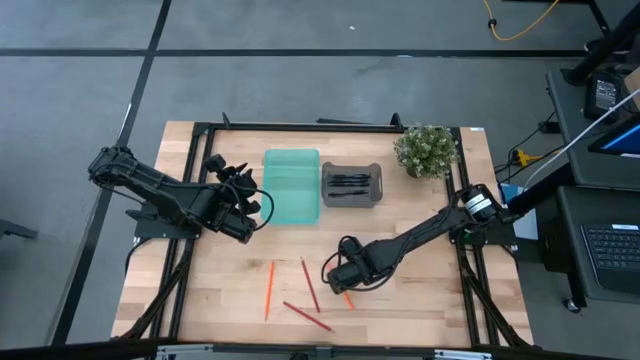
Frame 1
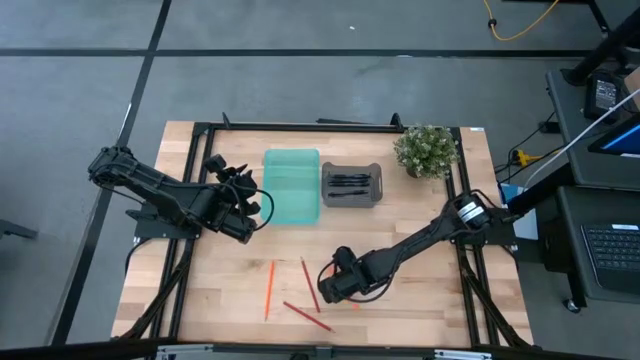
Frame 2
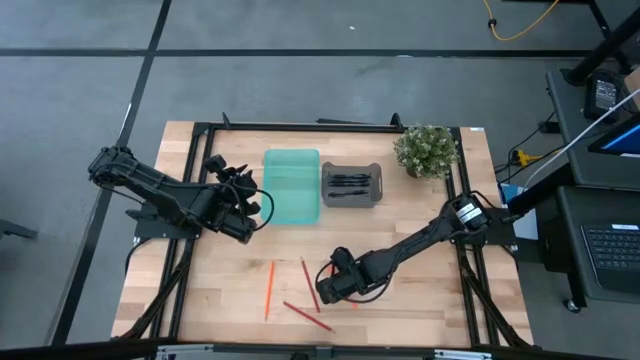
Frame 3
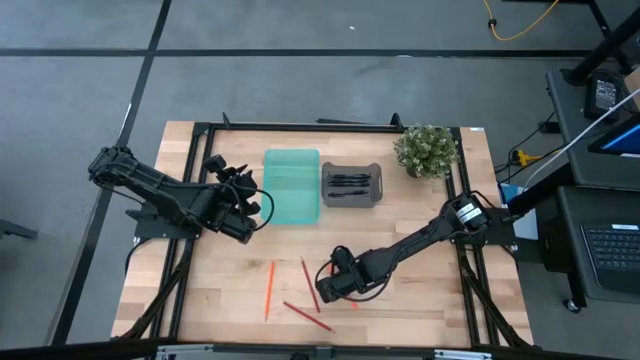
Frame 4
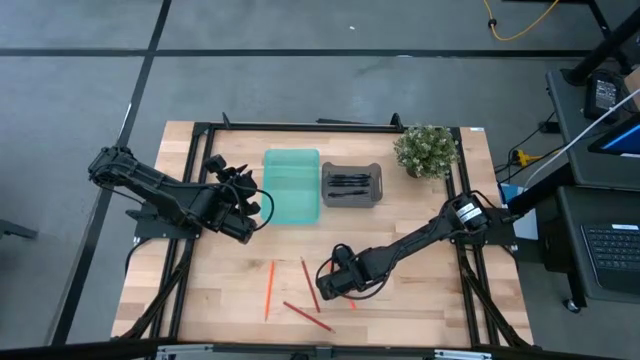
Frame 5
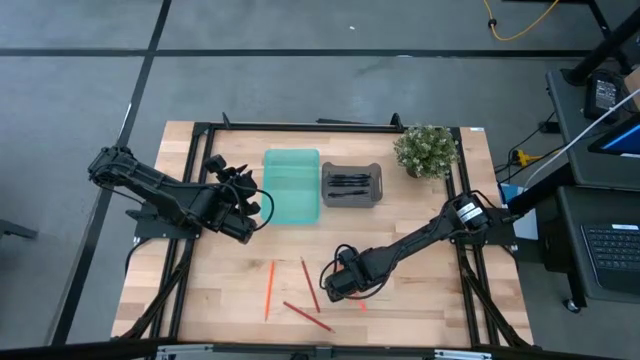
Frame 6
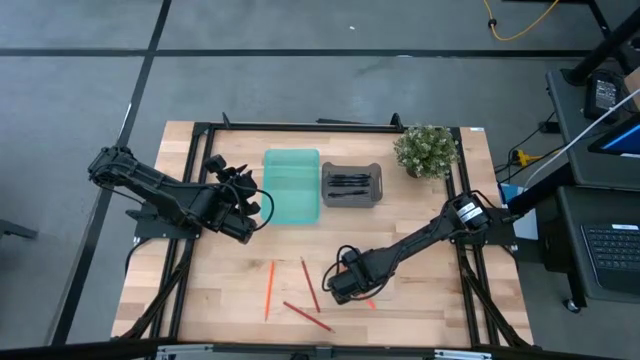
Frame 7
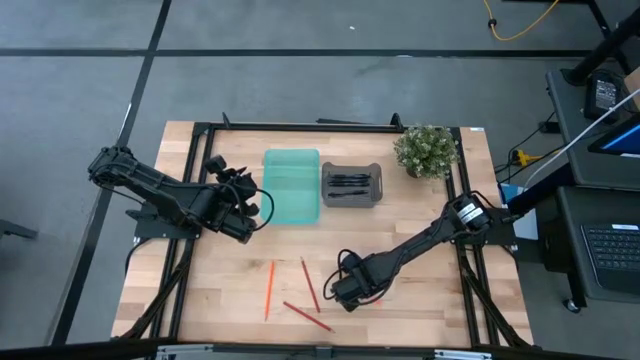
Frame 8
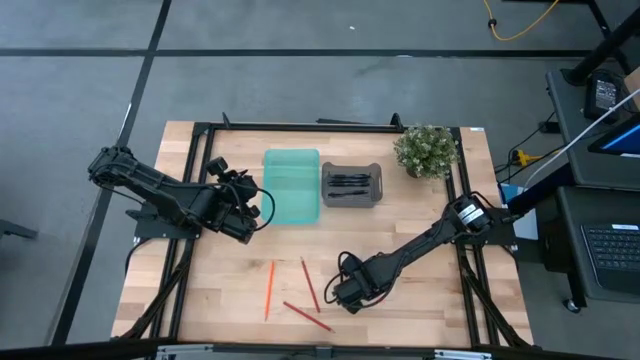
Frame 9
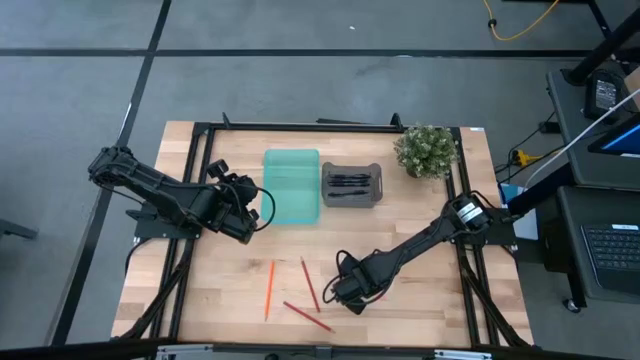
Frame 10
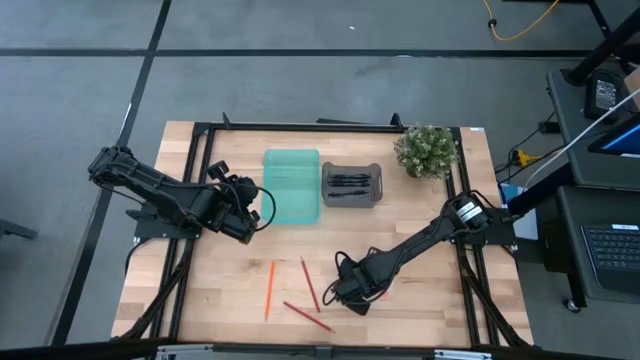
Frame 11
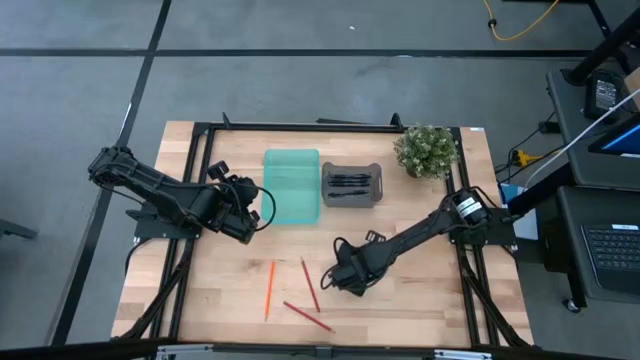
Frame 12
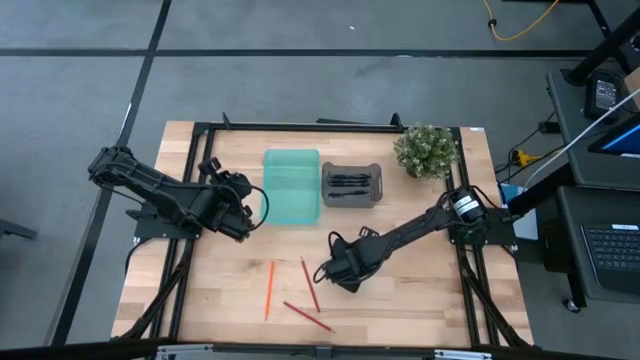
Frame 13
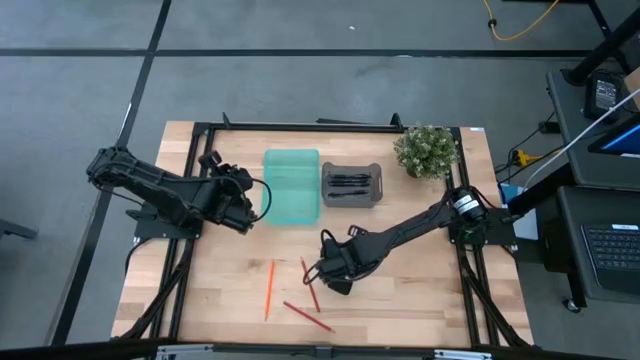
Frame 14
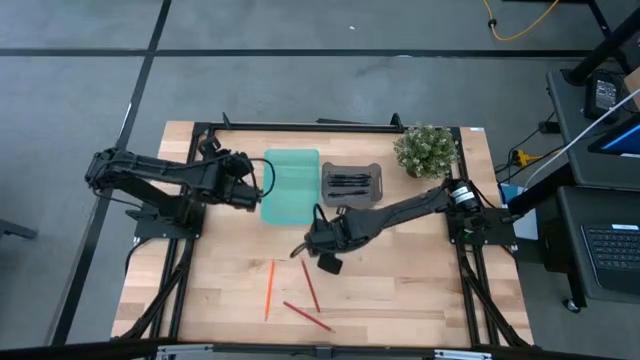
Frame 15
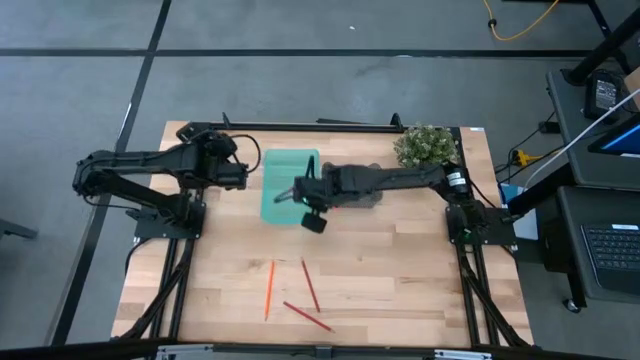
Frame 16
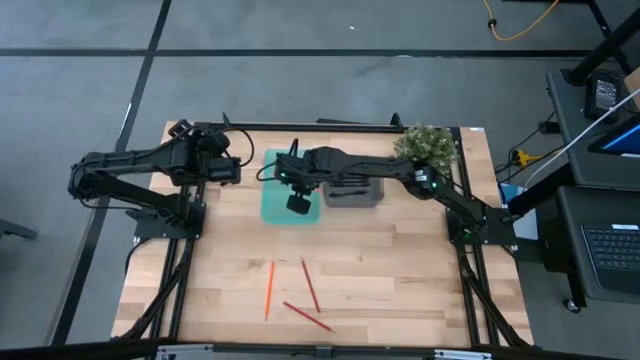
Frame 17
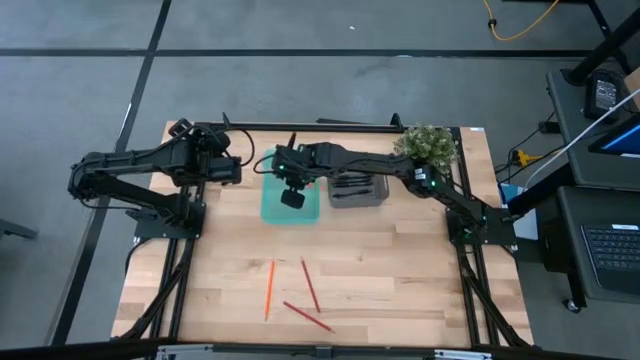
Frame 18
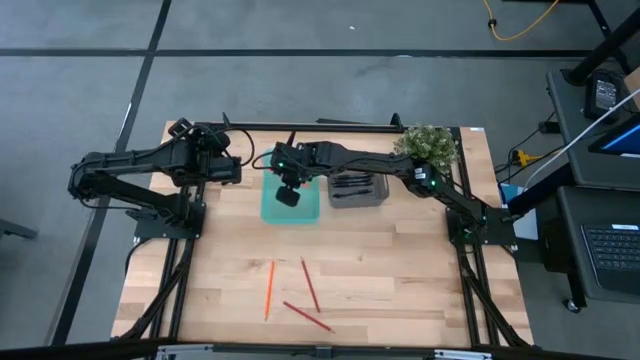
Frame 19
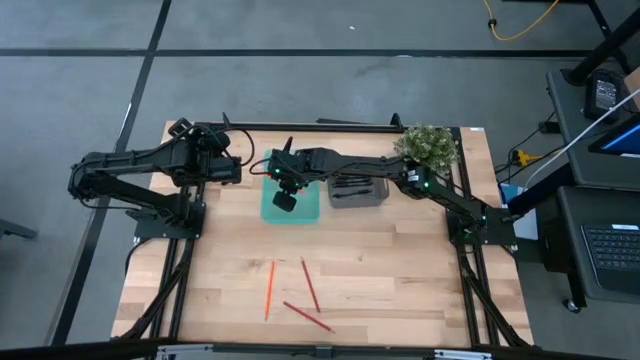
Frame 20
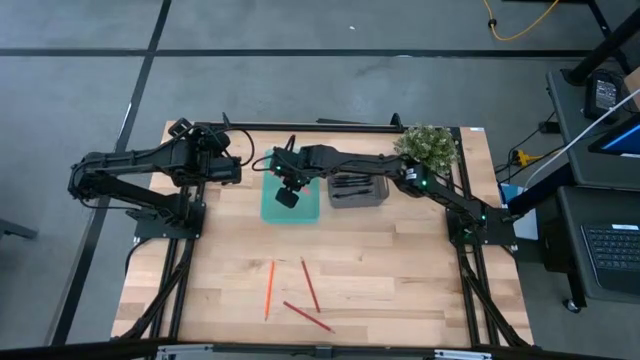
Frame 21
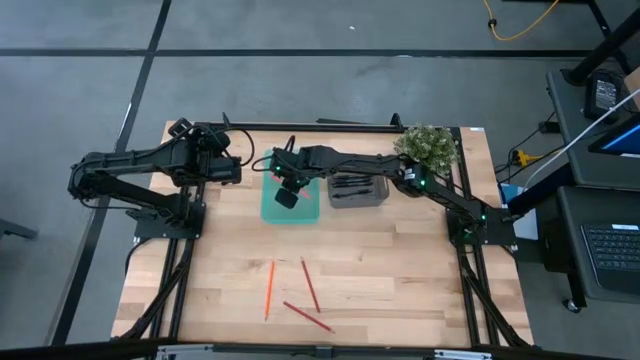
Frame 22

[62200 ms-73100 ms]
Task: Sort pens & pencils
Put the orange pencil into the green bin

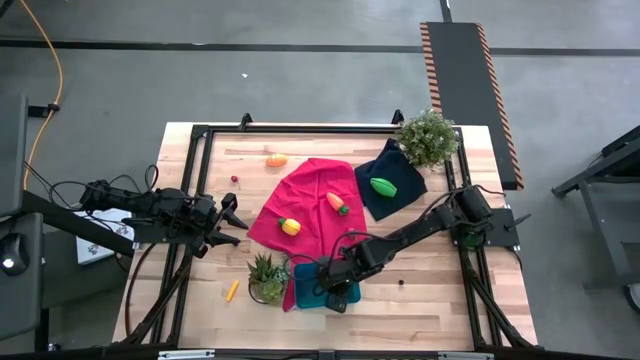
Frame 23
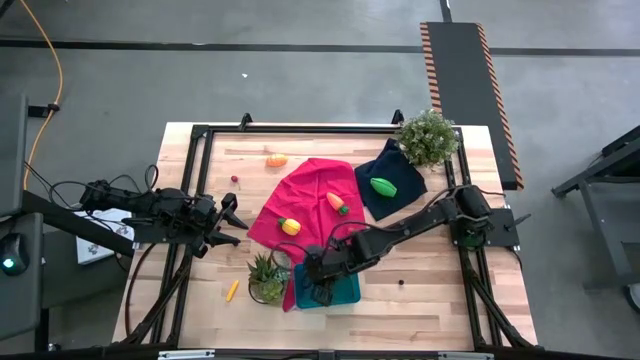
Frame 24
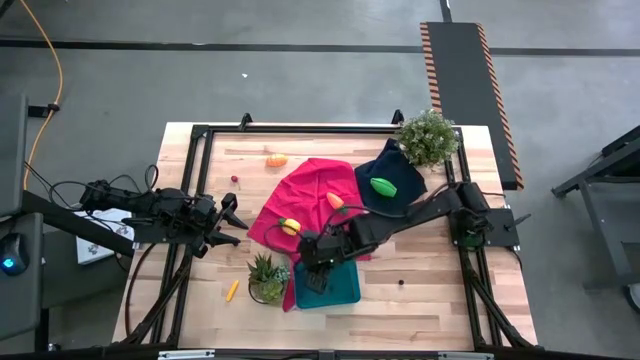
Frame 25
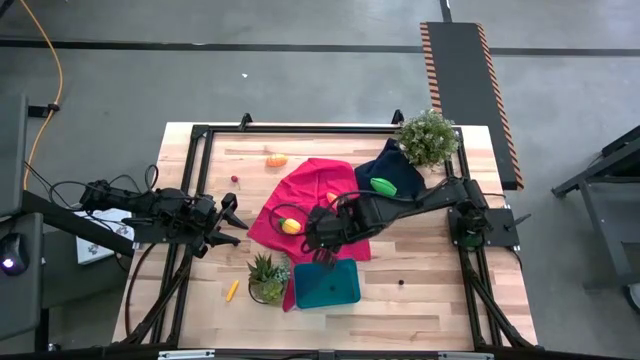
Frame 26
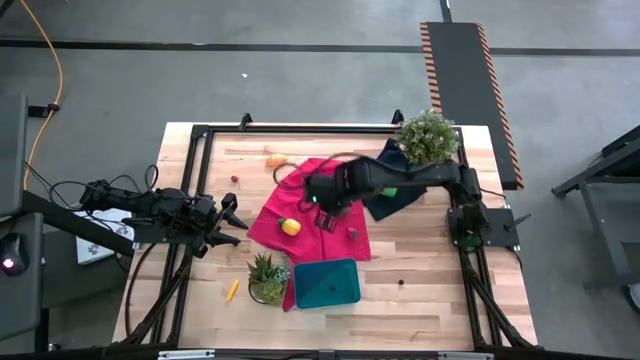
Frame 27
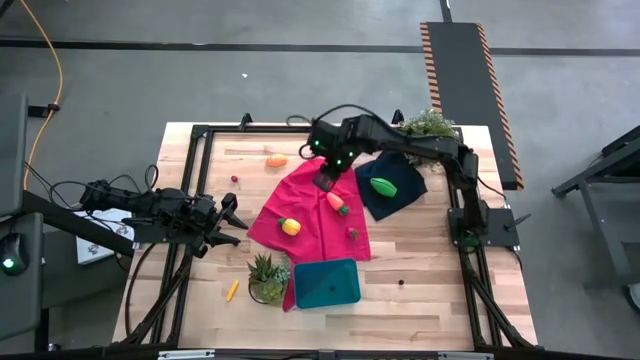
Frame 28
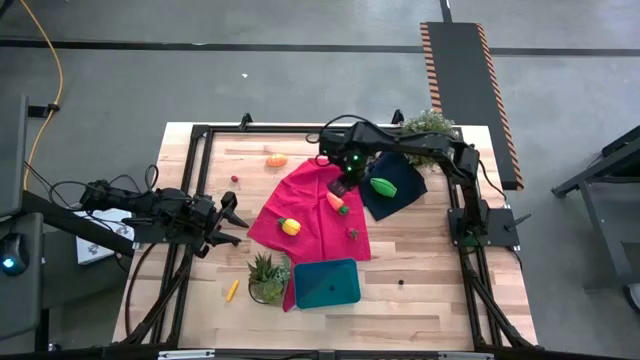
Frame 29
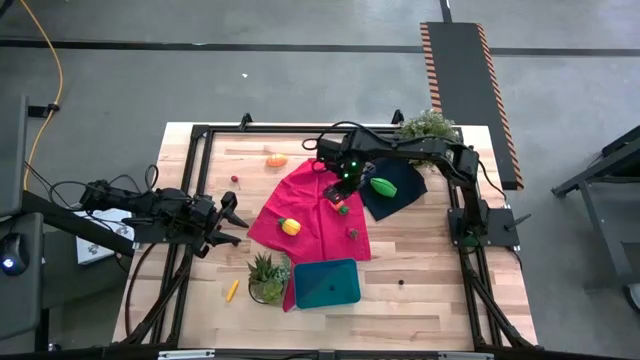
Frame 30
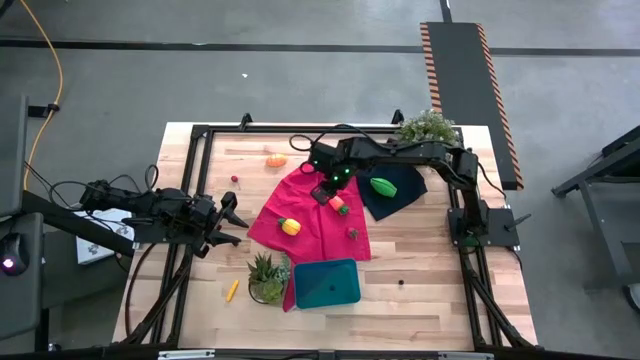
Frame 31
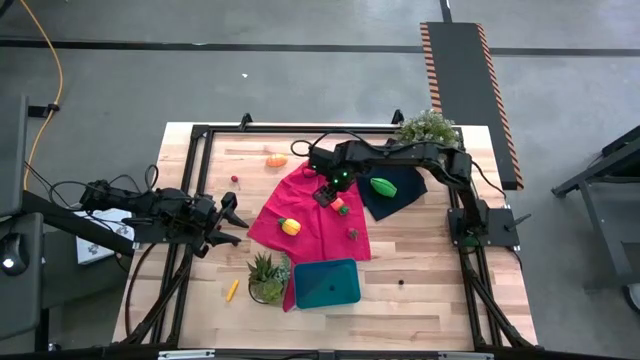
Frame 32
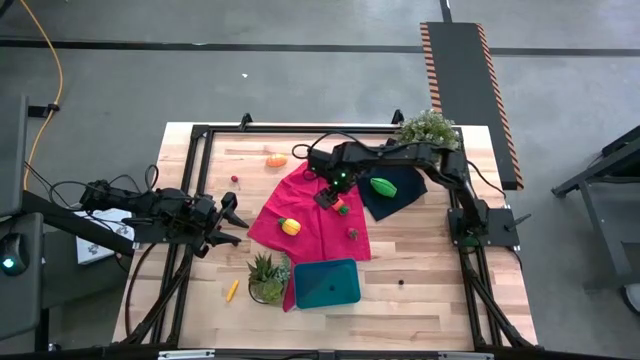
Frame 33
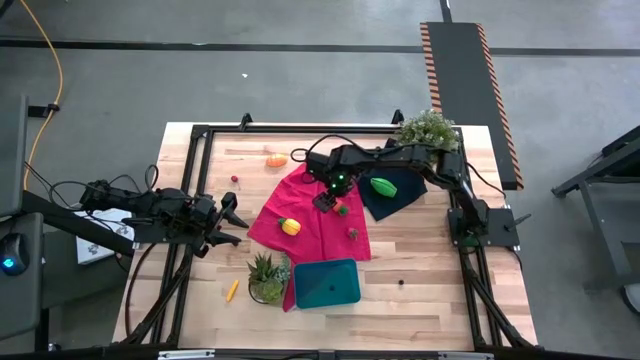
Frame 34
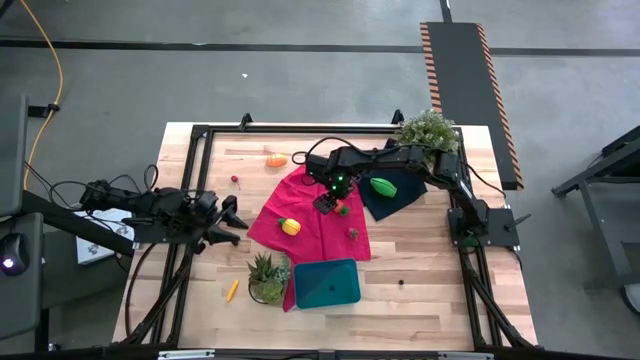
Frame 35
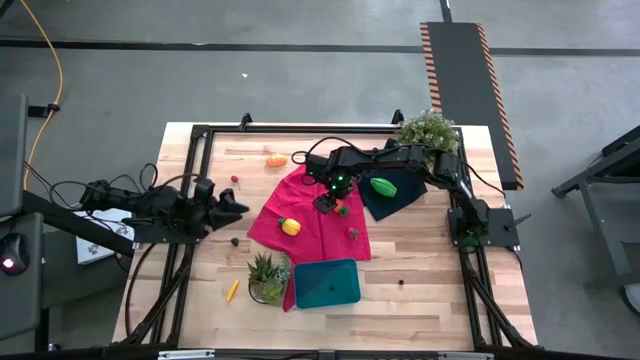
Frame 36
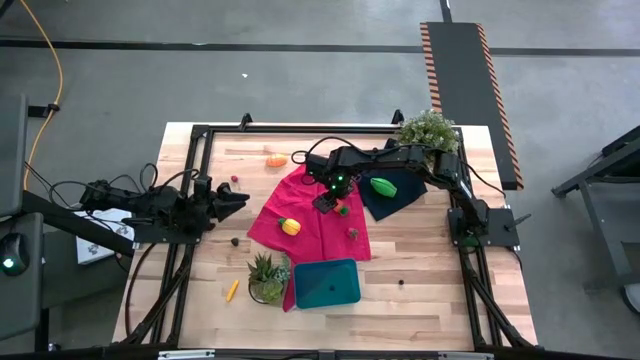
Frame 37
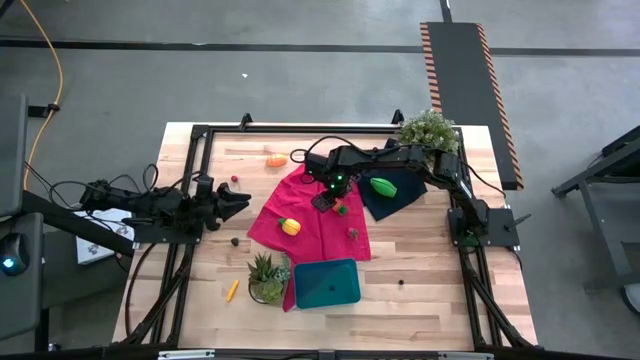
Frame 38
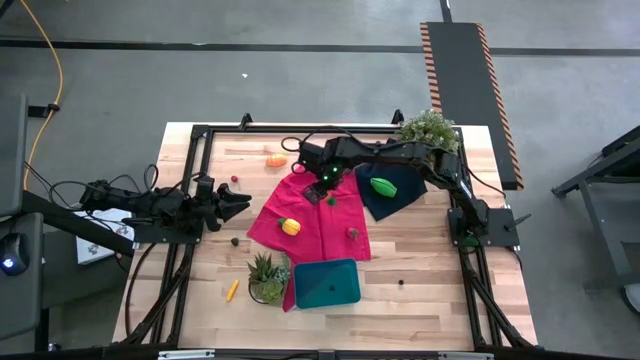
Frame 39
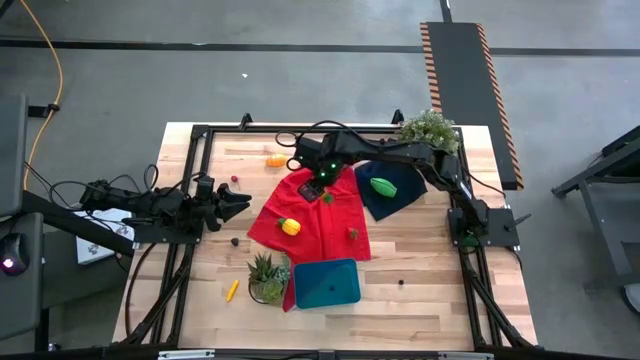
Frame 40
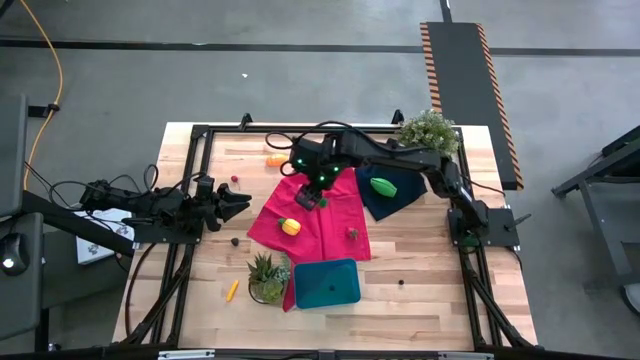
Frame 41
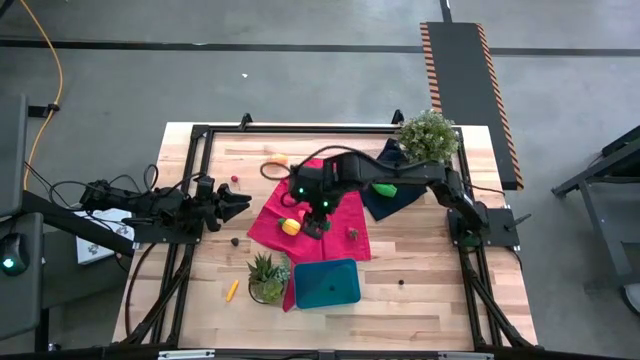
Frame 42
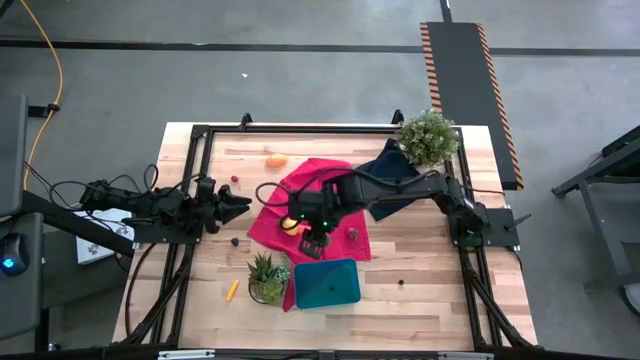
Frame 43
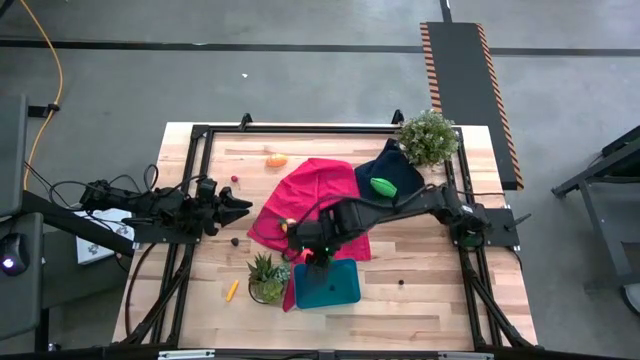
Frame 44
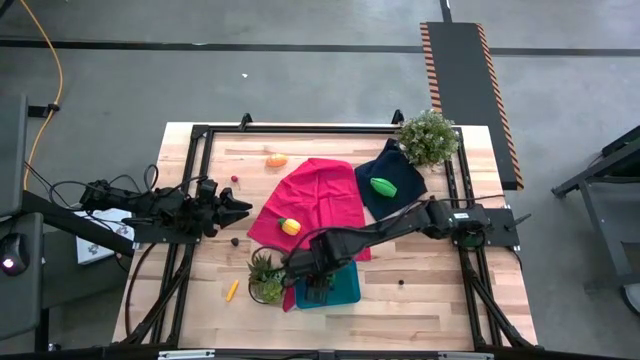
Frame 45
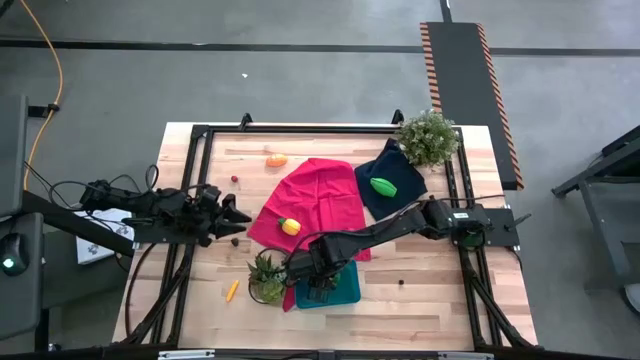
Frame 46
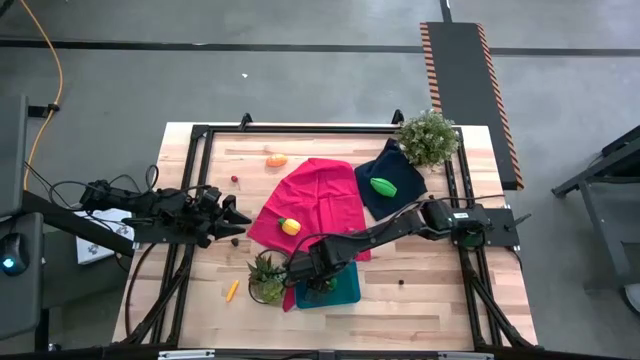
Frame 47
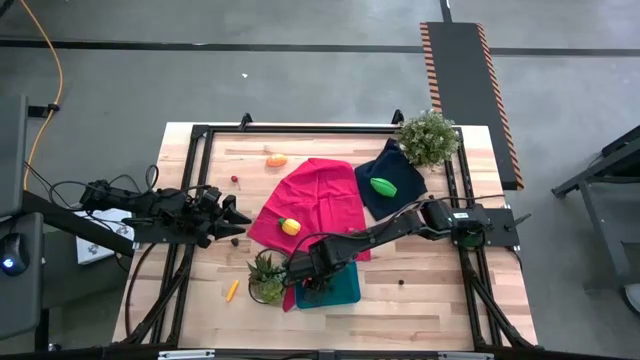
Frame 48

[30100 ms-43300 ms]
Task: Pick and placing Produce into tupperware
Put the orange carrot into the blue bin
